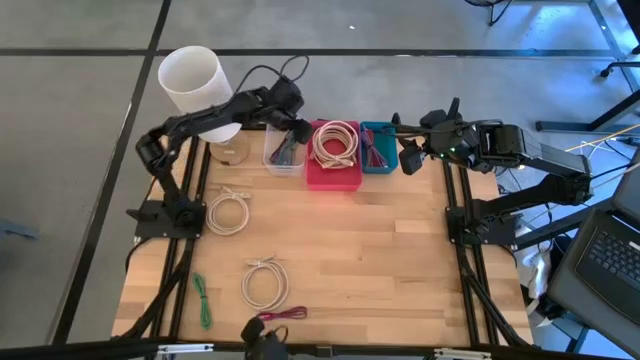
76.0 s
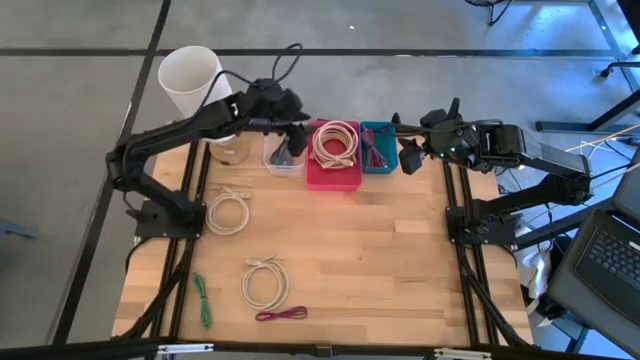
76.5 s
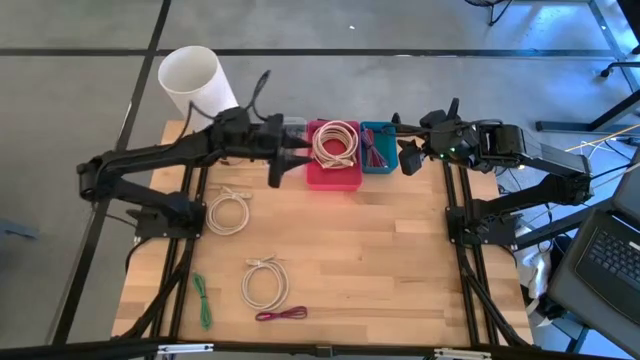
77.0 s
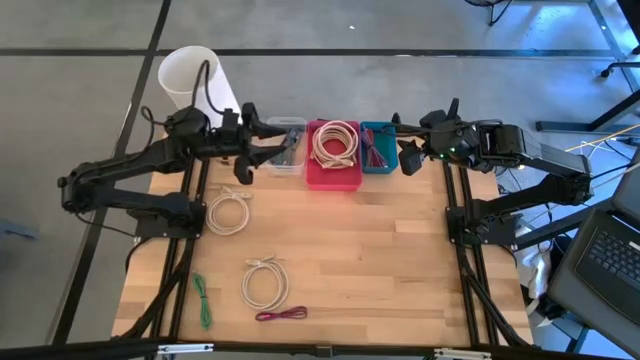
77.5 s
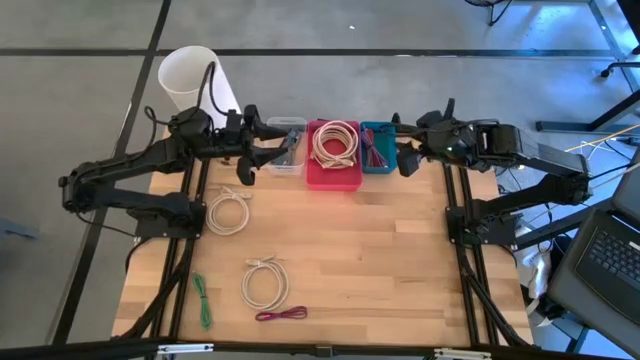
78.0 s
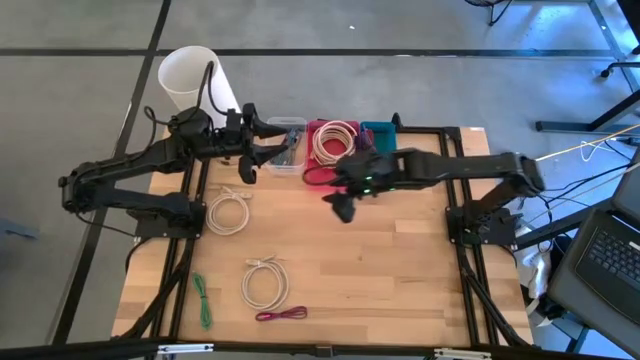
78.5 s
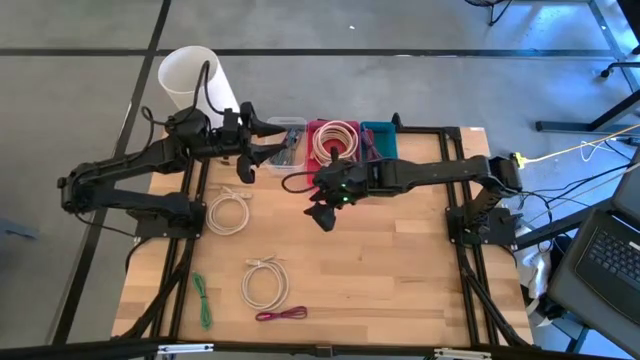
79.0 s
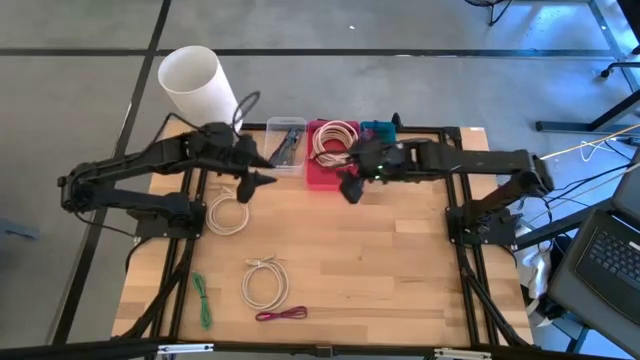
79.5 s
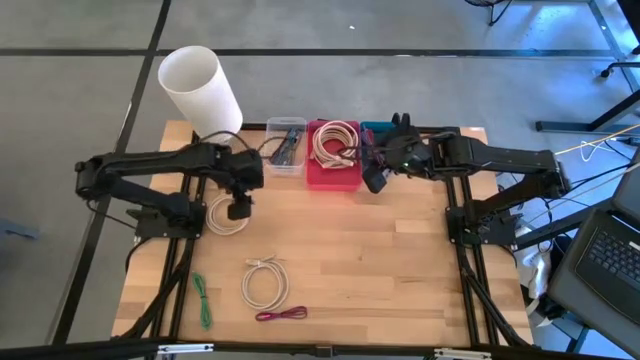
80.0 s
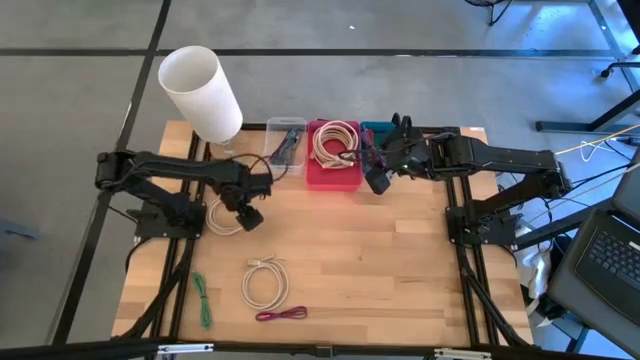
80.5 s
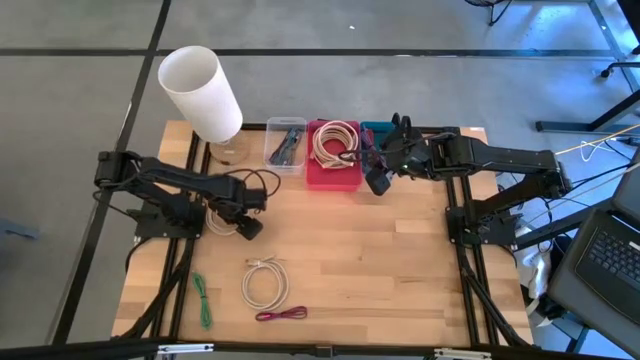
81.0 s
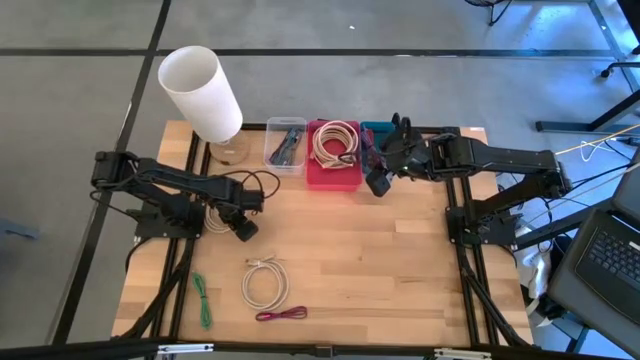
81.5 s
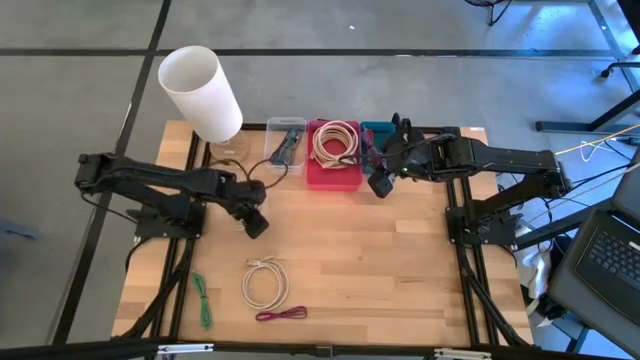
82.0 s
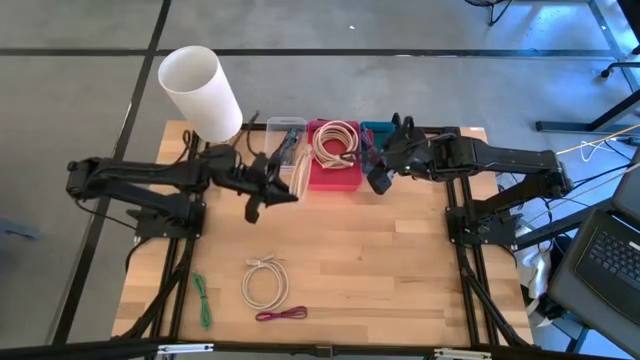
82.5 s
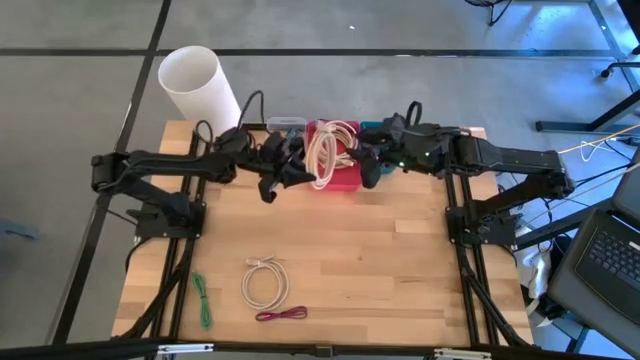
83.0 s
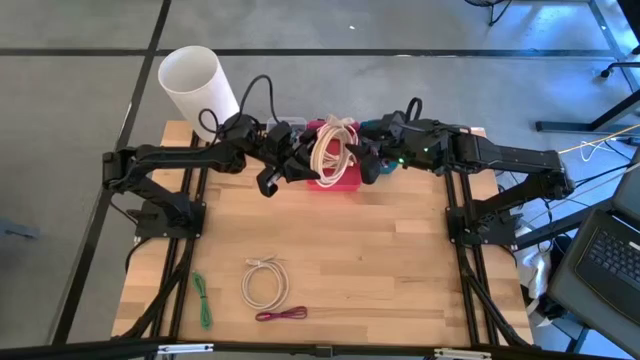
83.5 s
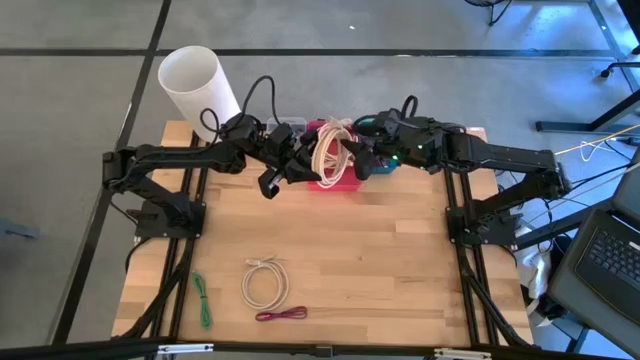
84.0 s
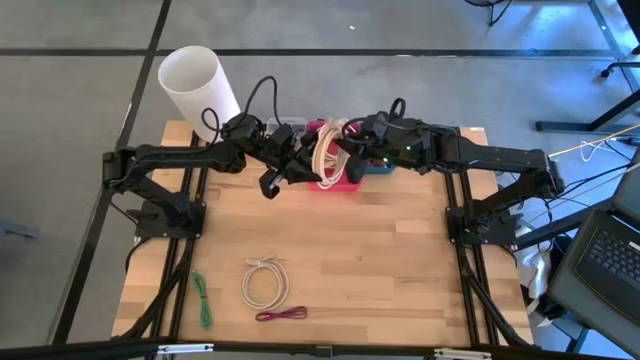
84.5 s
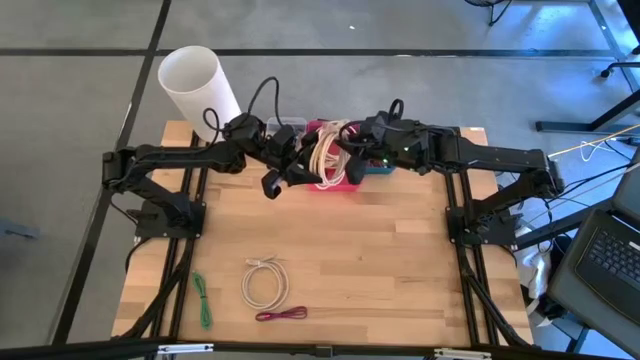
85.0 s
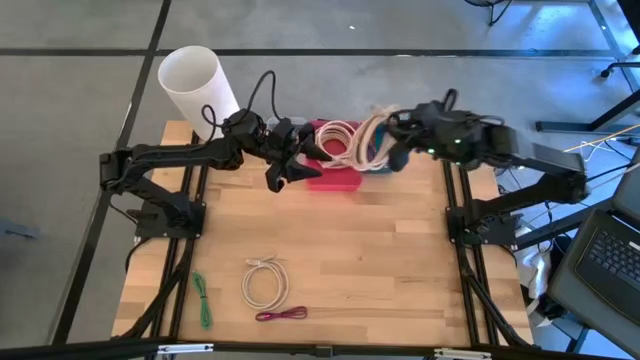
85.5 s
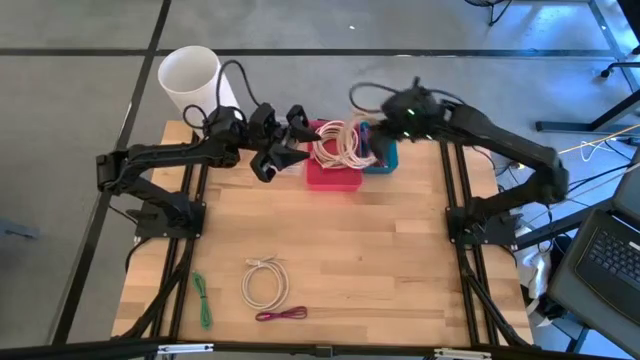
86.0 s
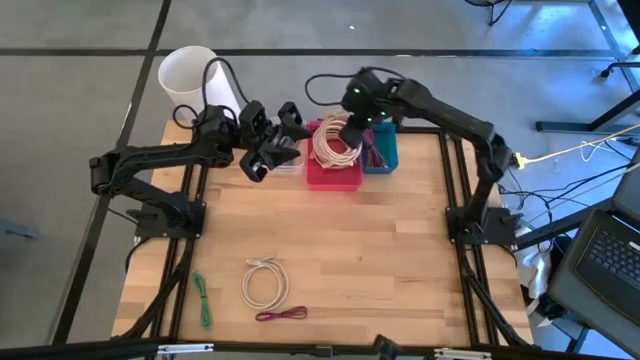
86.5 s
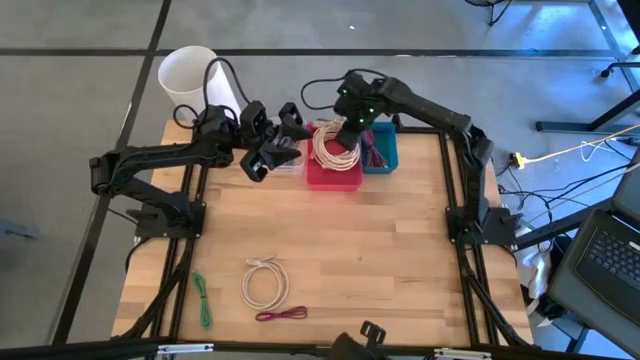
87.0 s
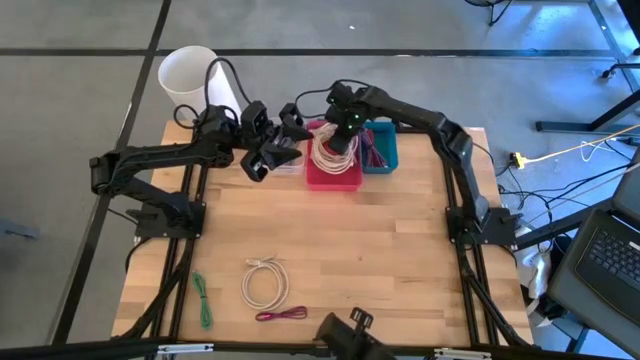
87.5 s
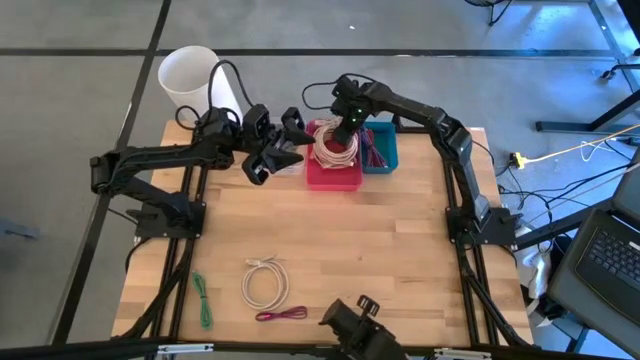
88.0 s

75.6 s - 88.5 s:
Task: Pick & Place USB Port
Put the brown HDMI cable into the red bin

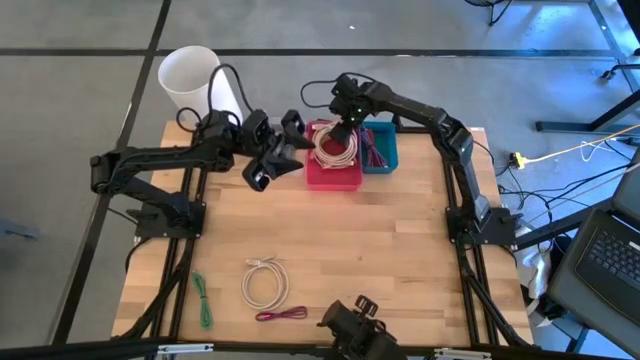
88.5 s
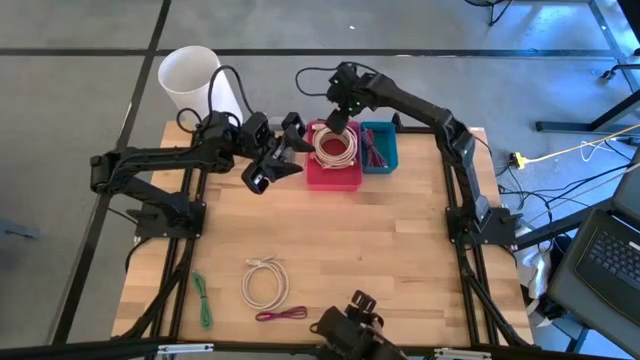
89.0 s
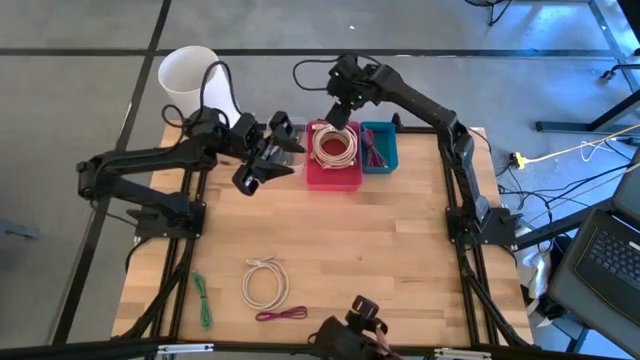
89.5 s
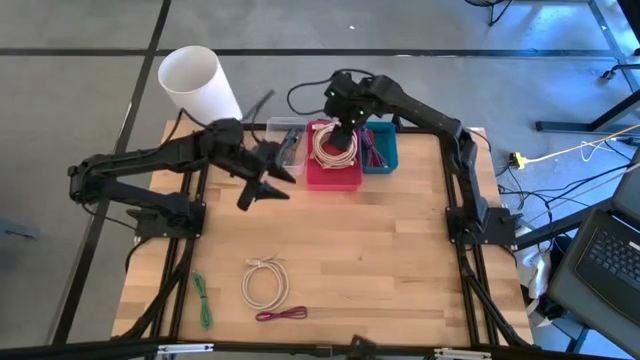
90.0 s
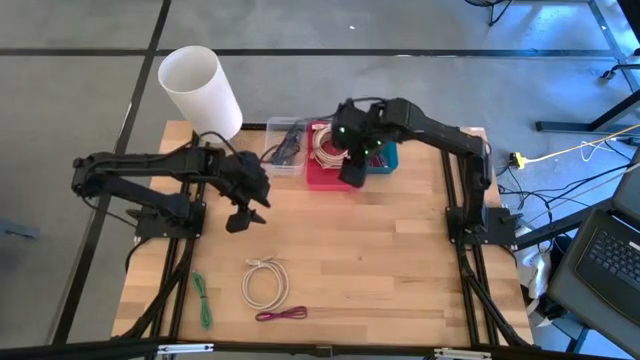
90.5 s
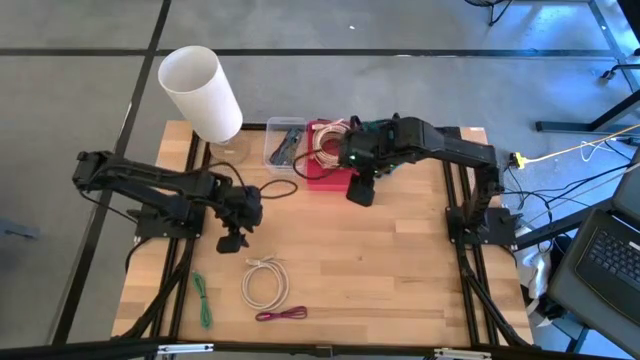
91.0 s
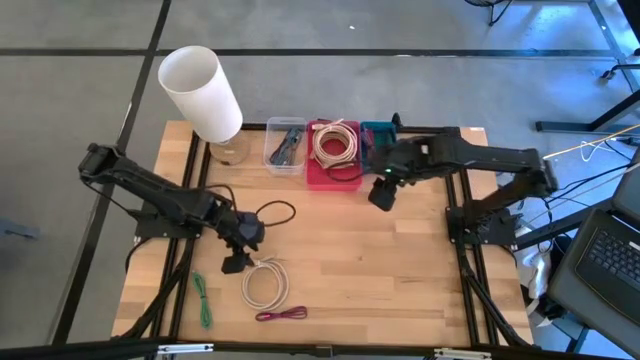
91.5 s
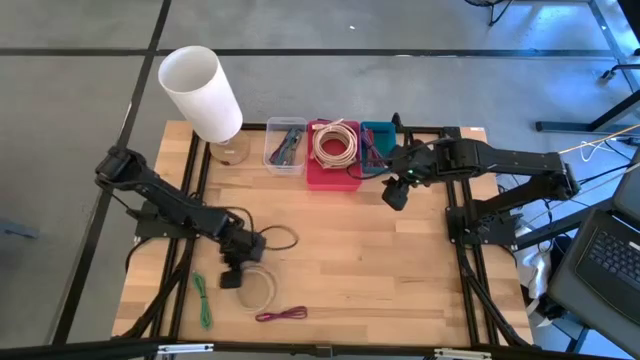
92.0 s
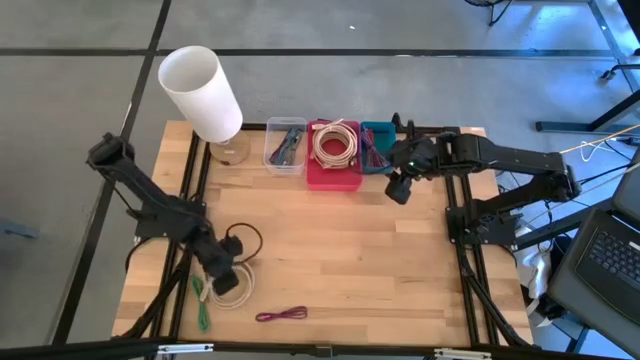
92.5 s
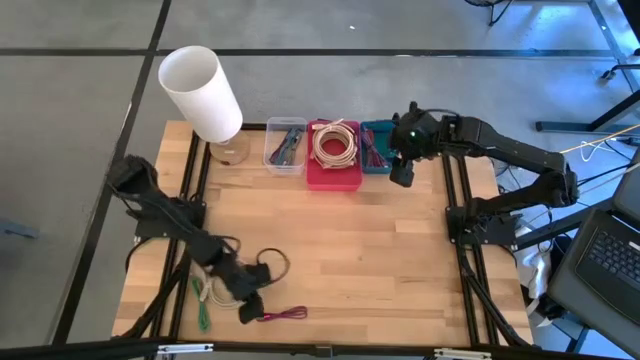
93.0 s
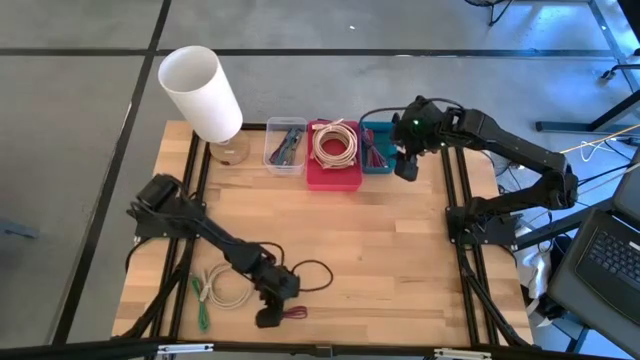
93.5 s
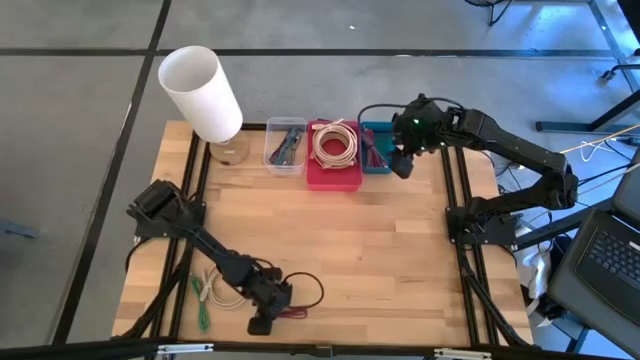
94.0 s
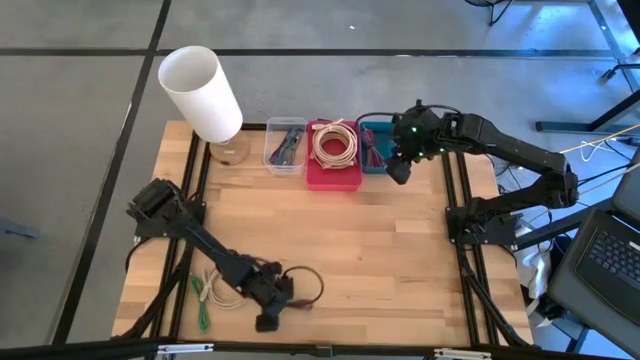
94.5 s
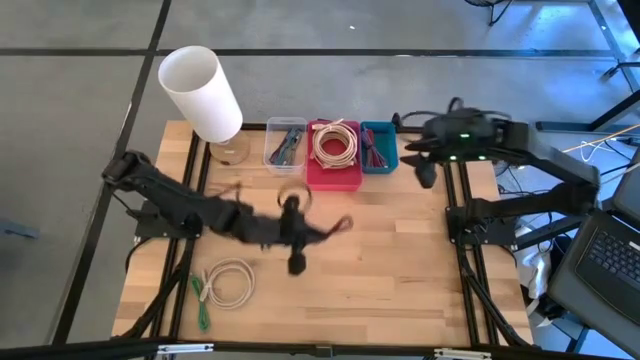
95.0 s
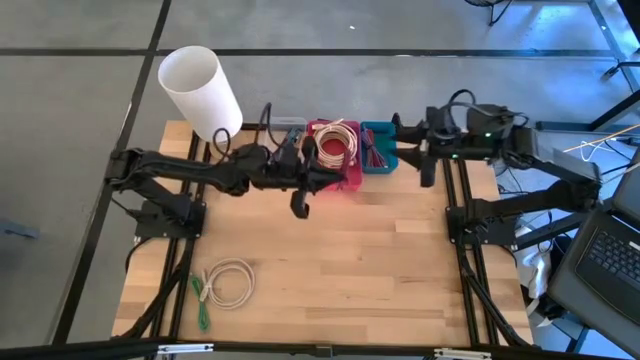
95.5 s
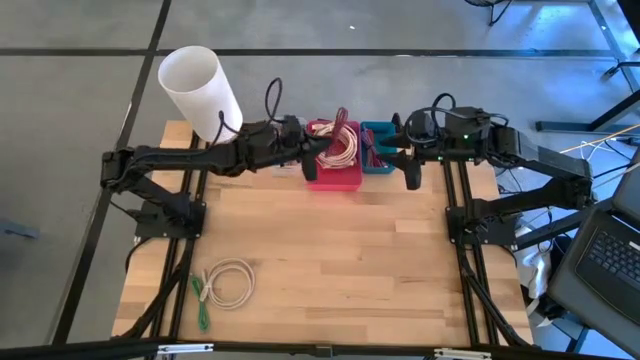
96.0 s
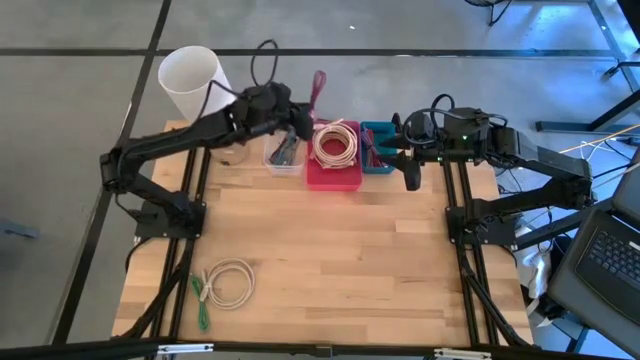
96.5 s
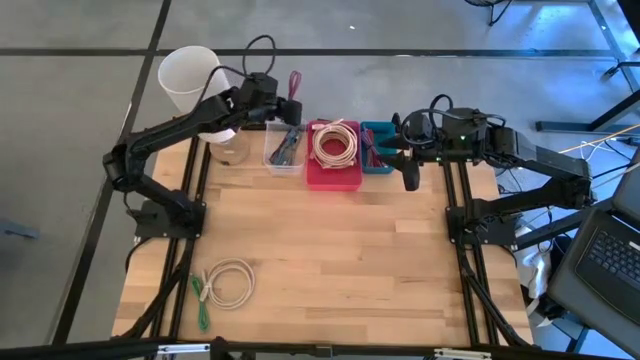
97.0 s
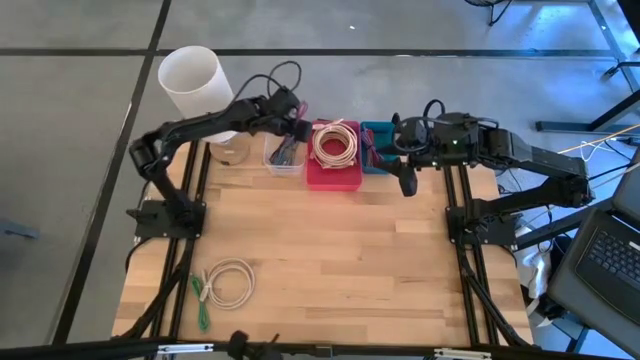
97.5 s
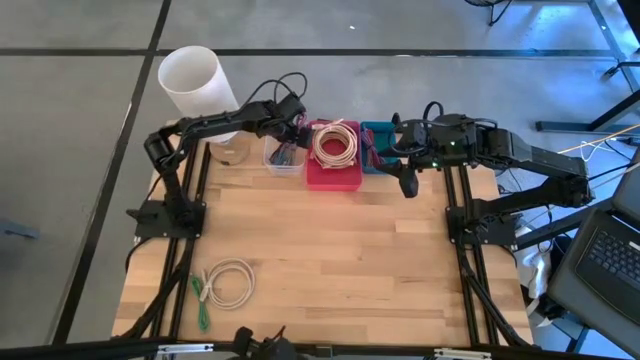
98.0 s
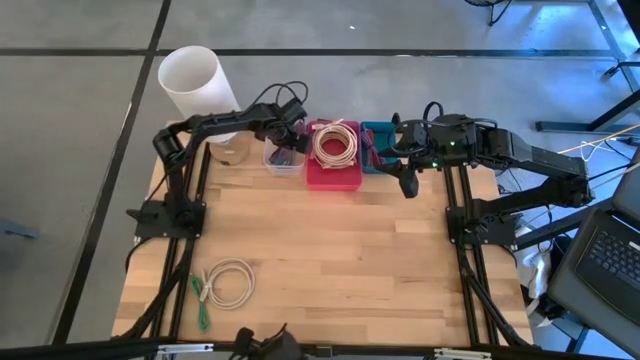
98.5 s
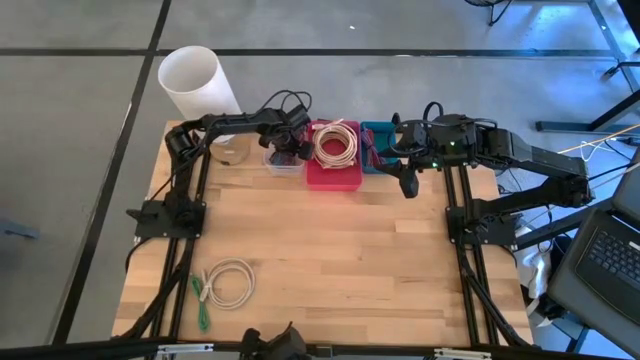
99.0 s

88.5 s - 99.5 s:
Put the pink and black charger cable into the white bin
